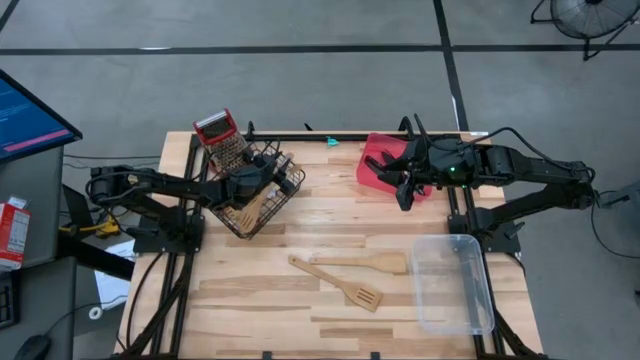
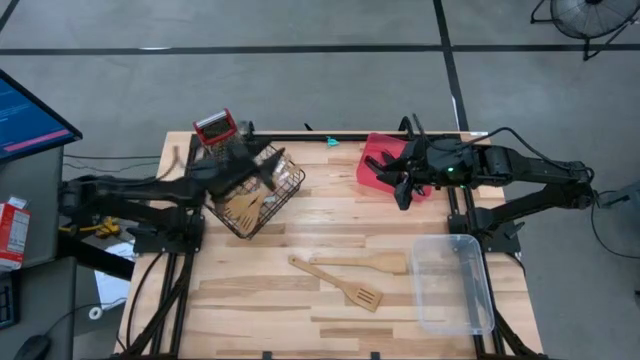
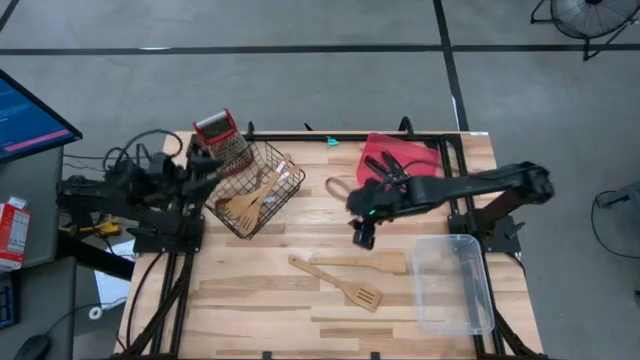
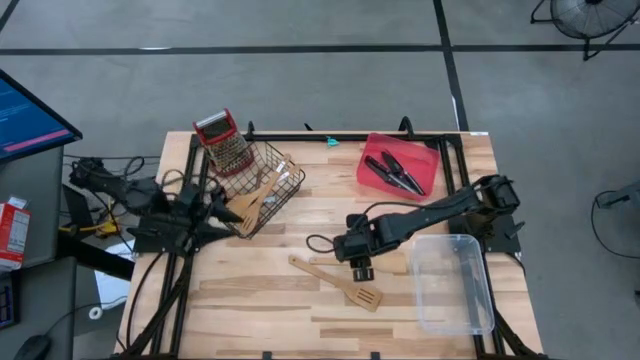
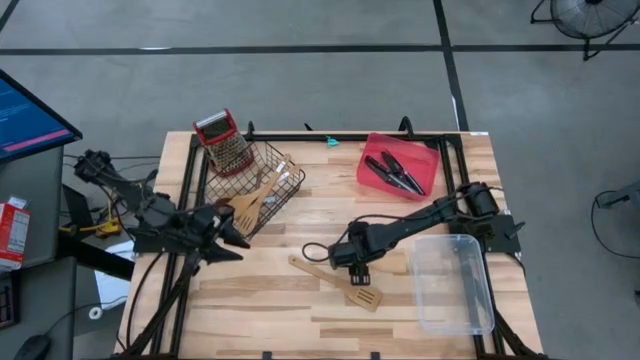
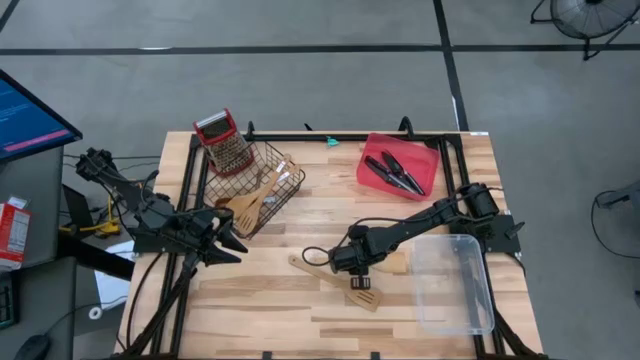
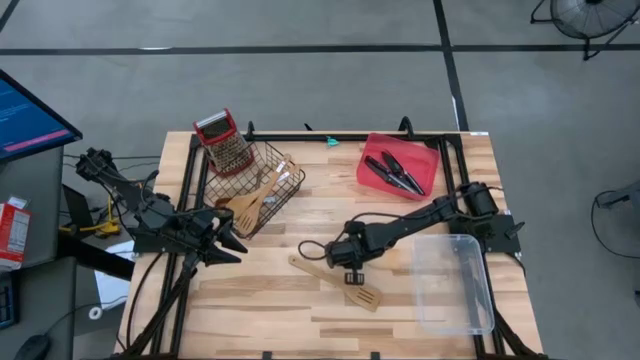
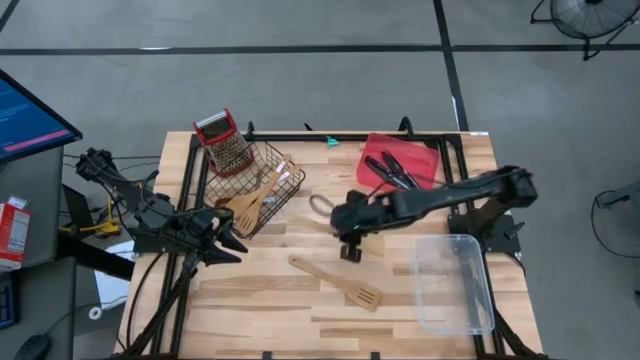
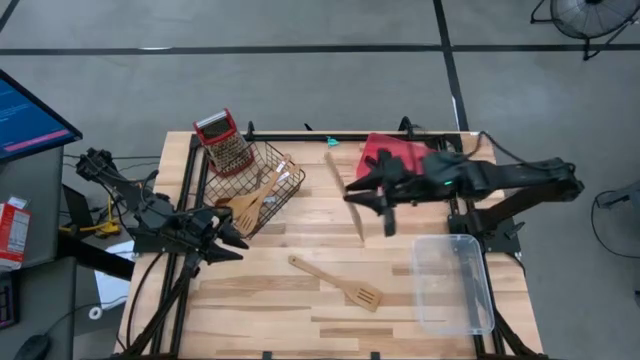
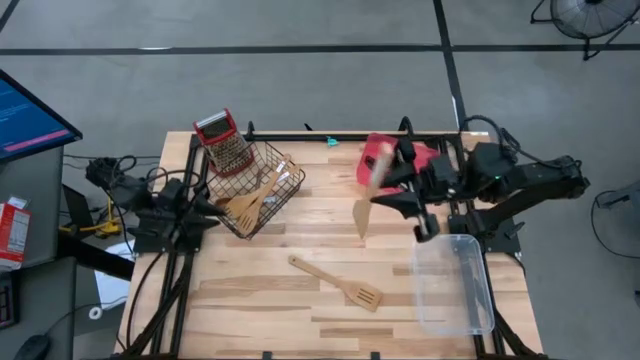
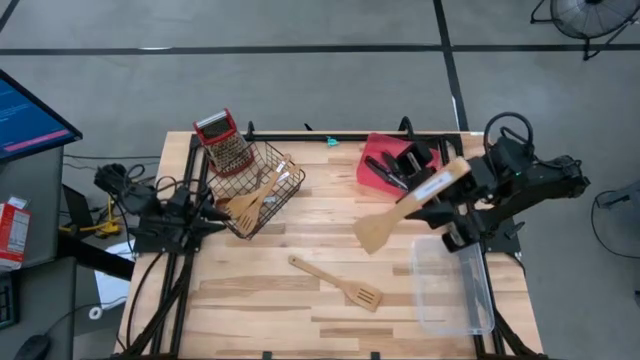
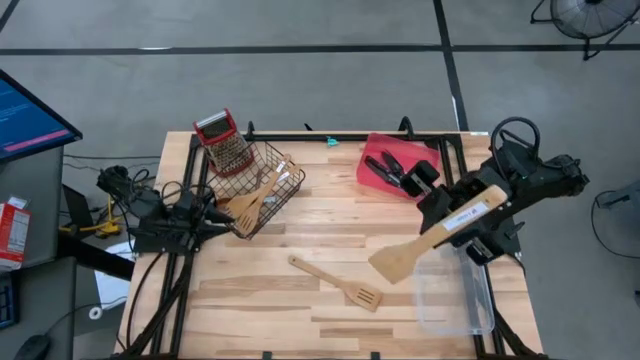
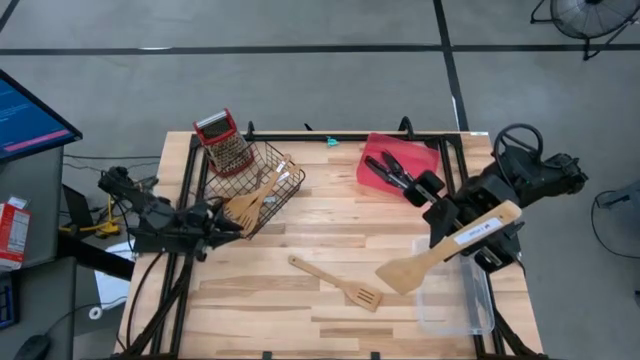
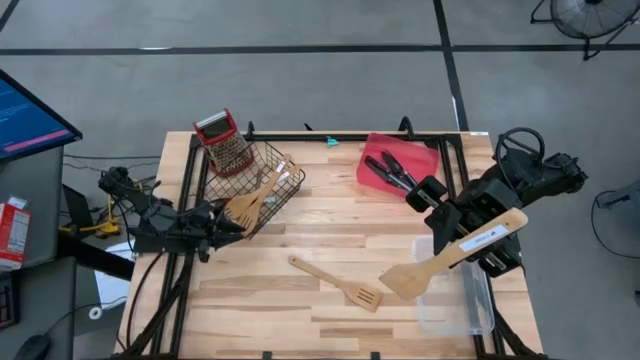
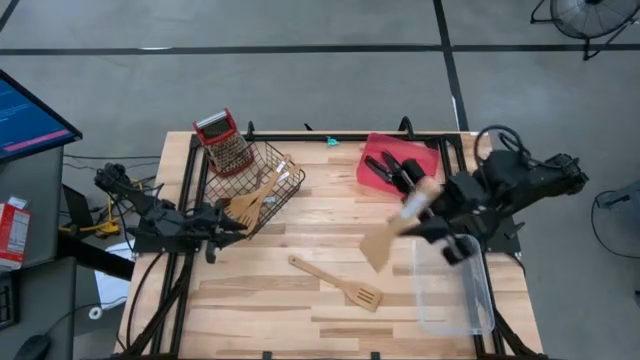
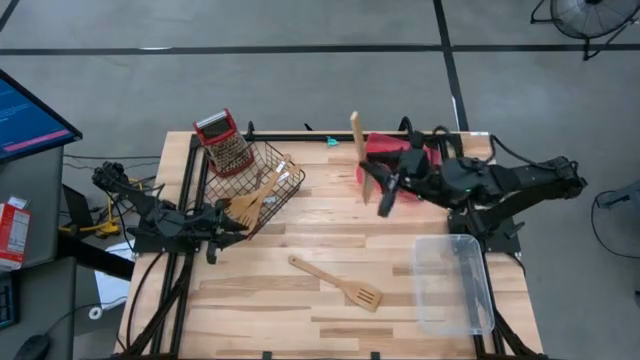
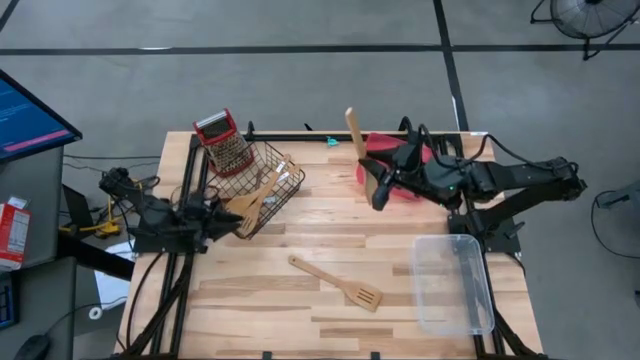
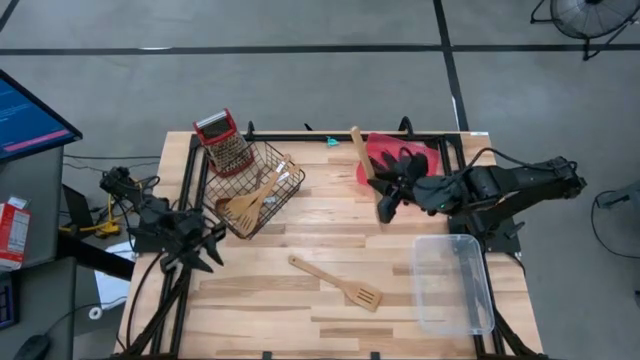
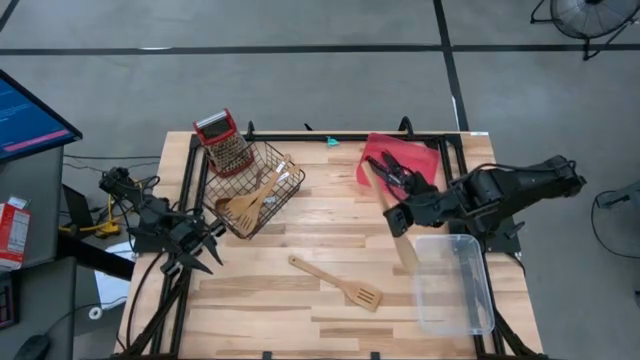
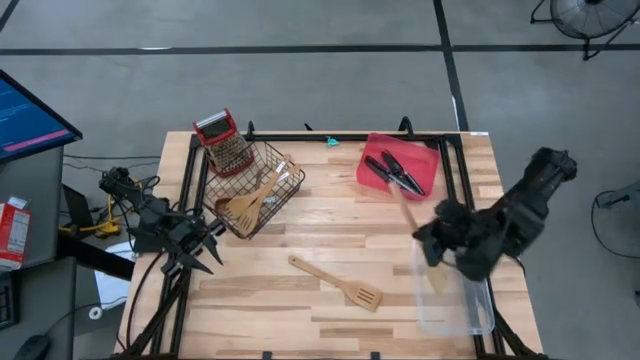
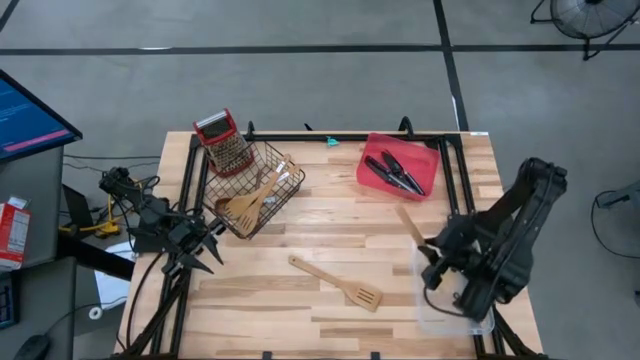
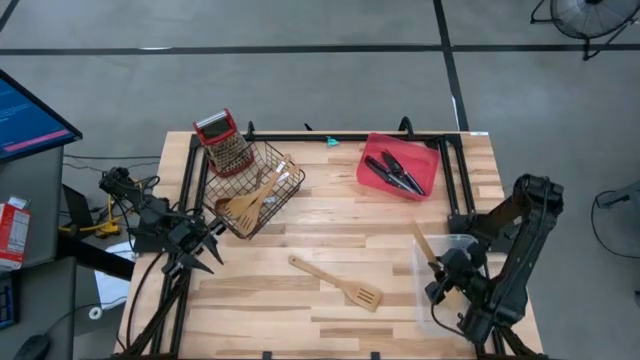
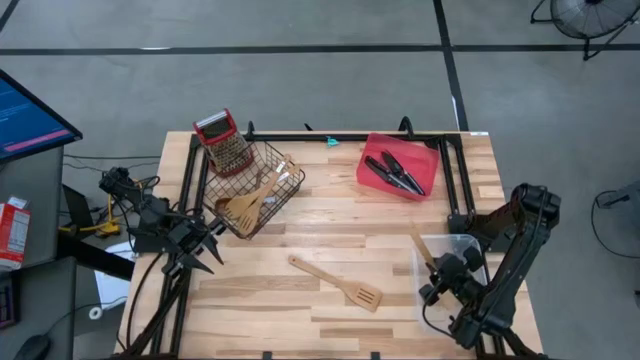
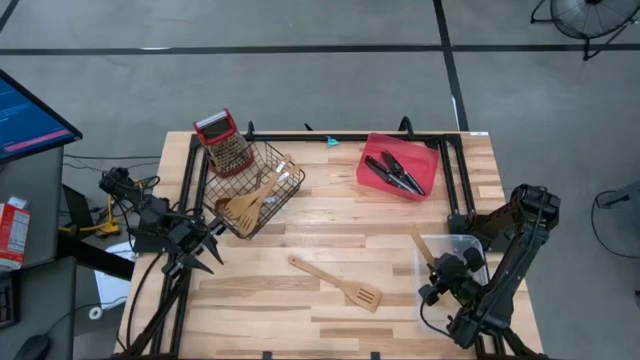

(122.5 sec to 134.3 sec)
Task: Pick & Place Kitchen Items
Put the top brown spatula into the transparent bin

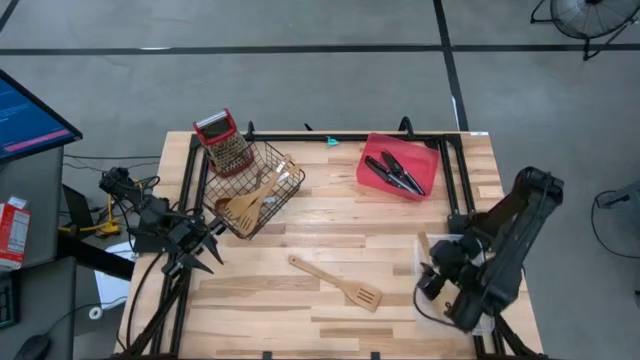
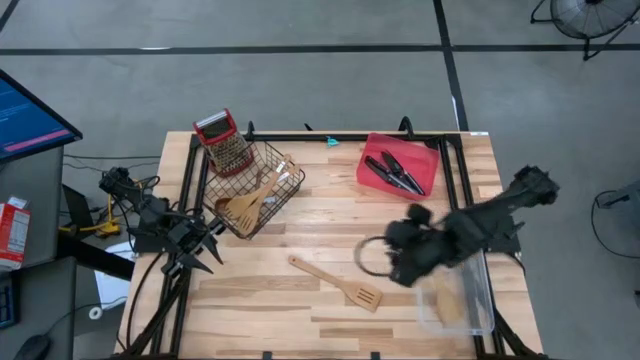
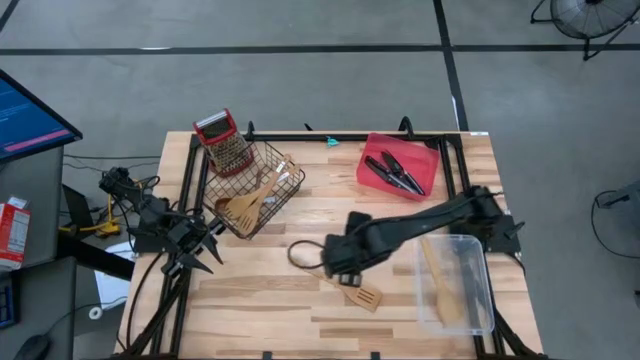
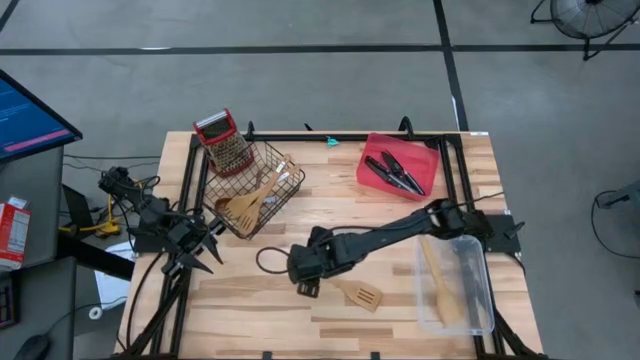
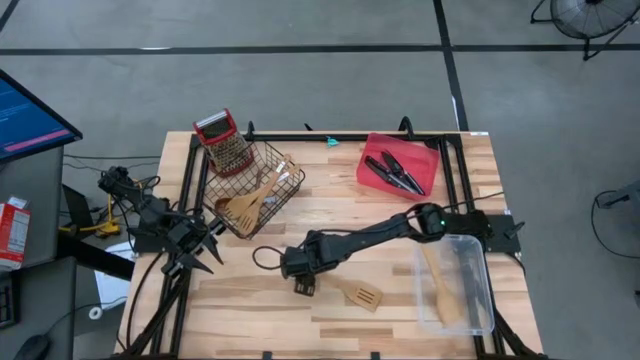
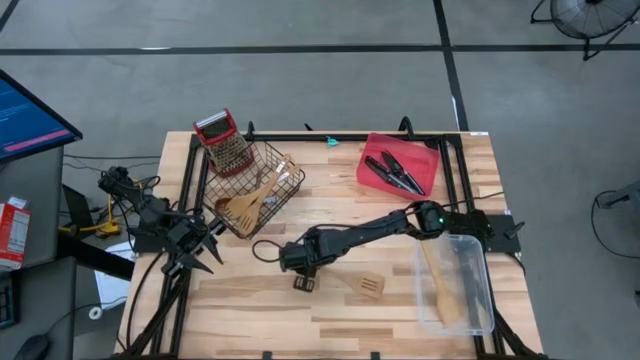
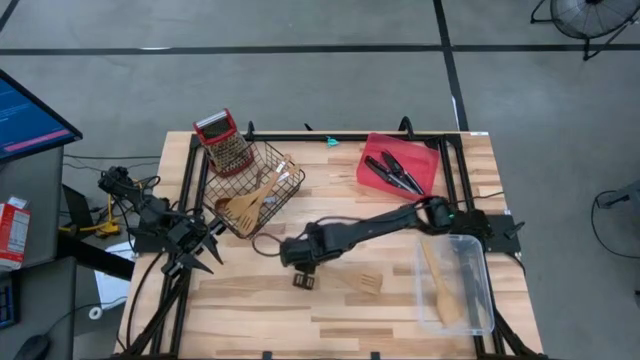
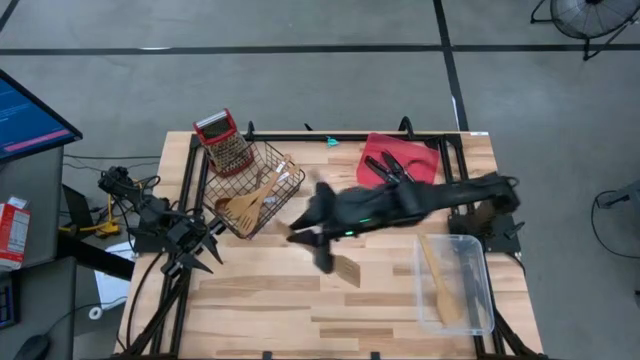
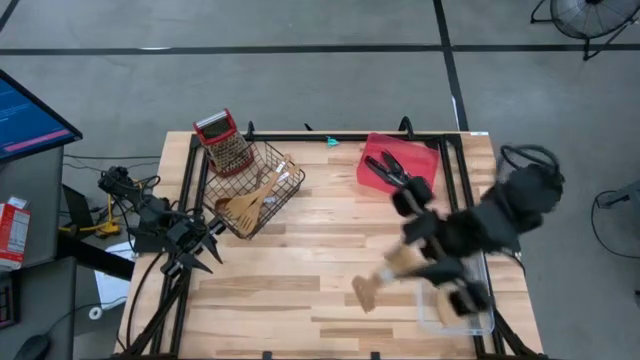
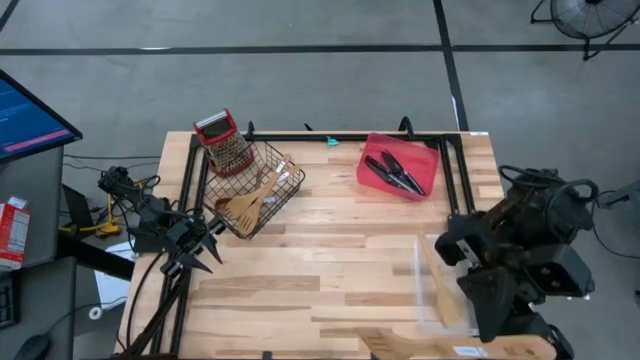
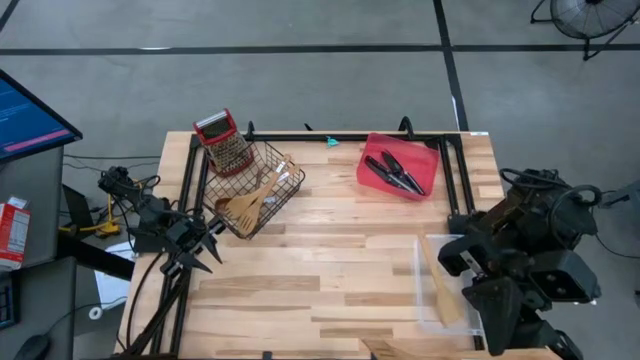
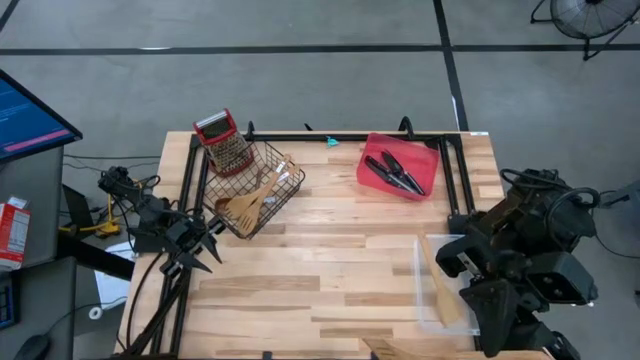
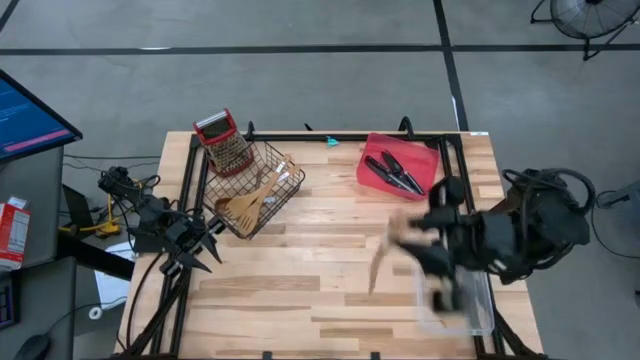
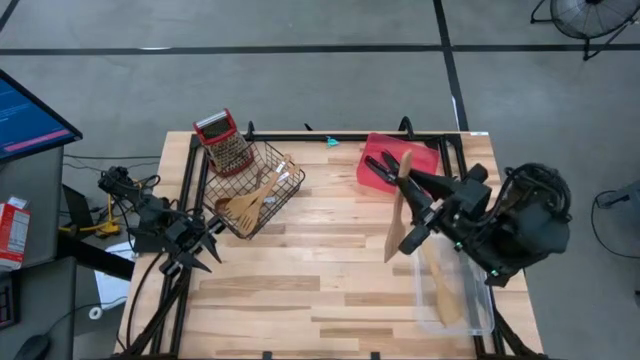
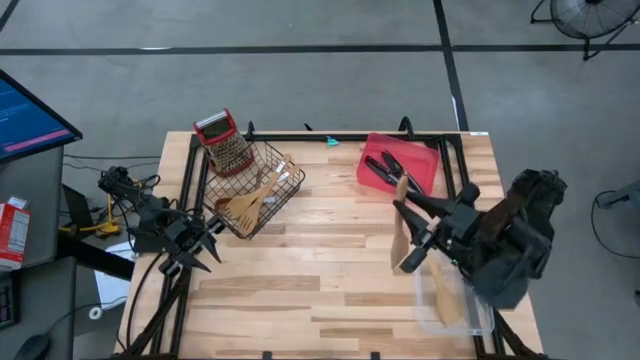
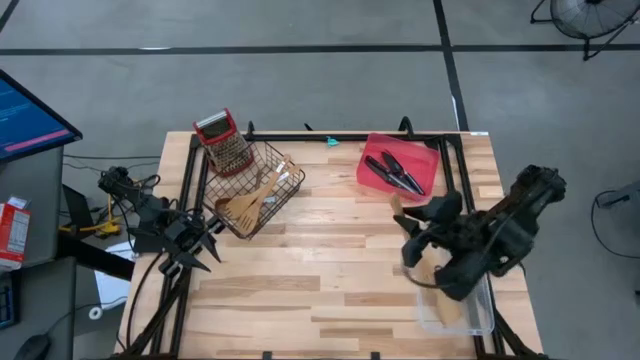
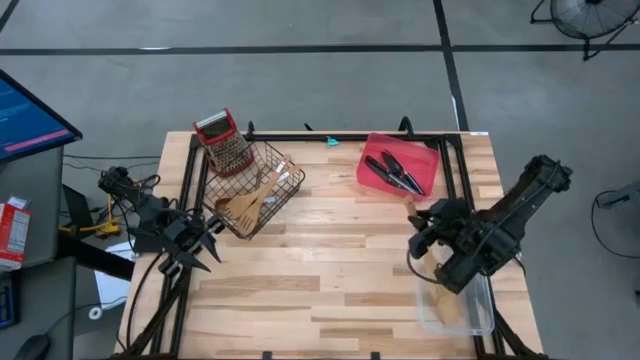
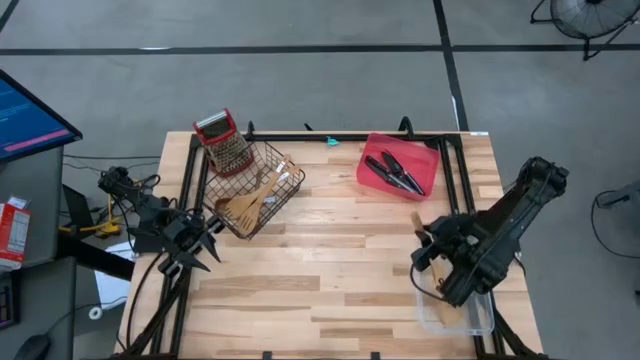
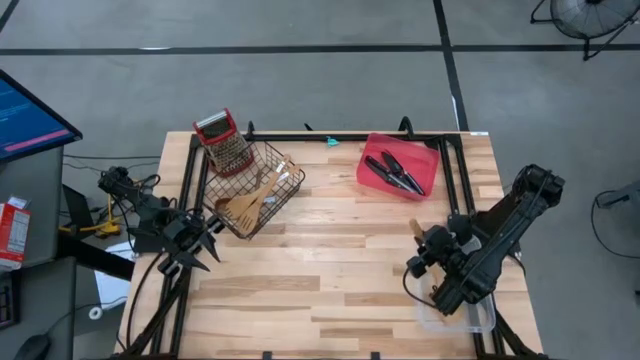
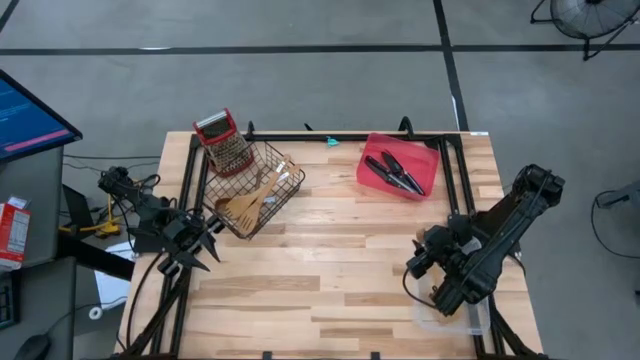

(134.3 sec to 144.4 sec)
Put the brown spatula into the transparent bin
